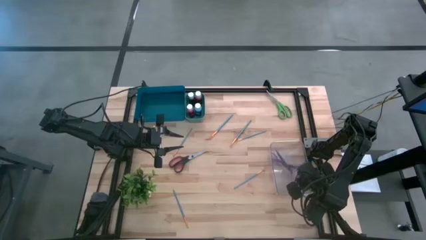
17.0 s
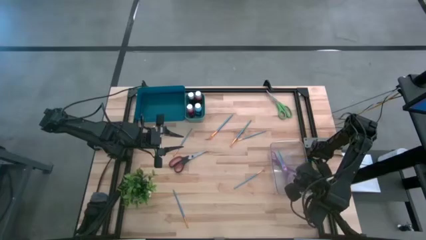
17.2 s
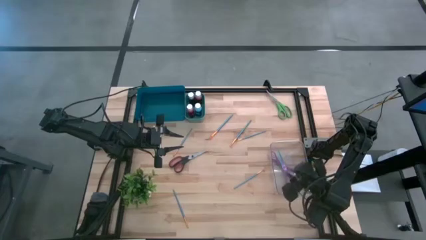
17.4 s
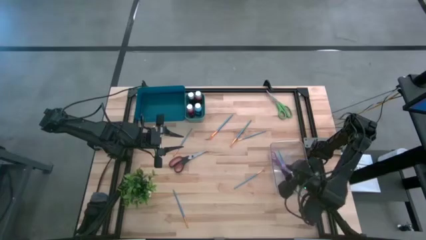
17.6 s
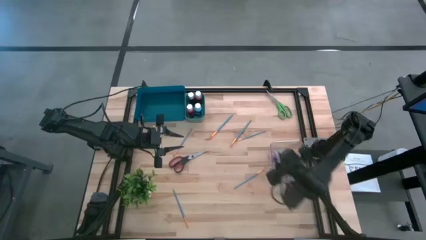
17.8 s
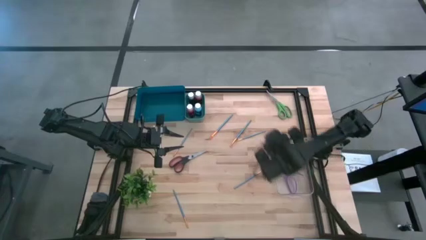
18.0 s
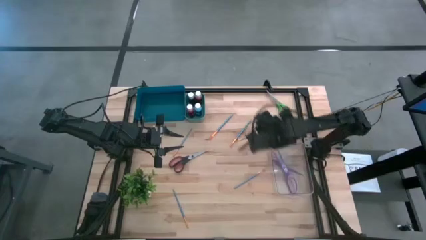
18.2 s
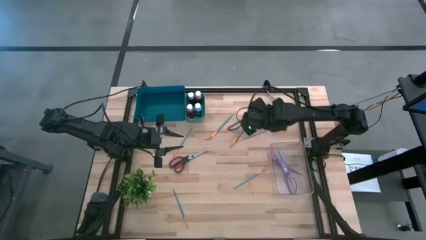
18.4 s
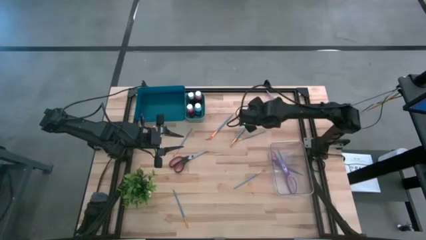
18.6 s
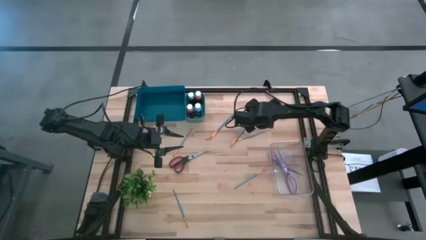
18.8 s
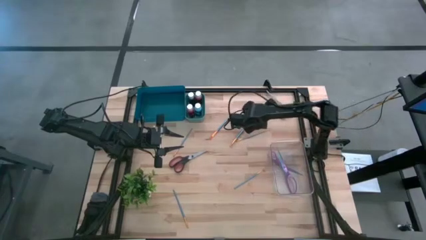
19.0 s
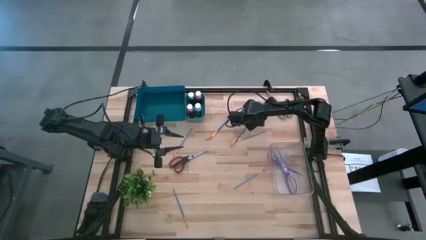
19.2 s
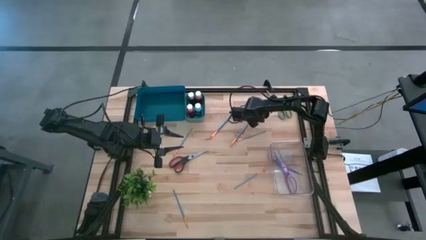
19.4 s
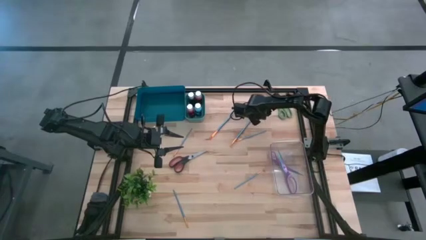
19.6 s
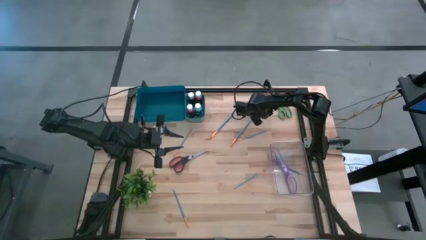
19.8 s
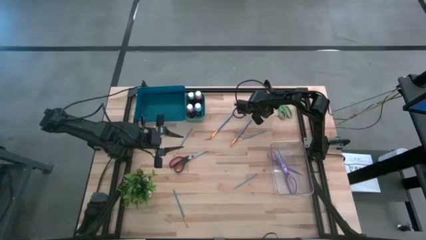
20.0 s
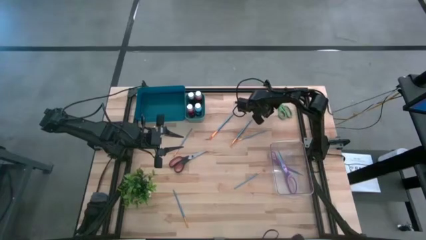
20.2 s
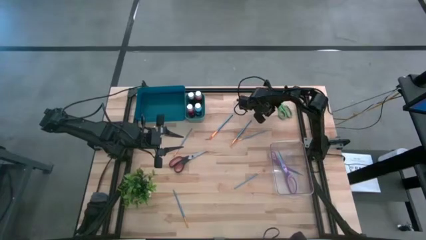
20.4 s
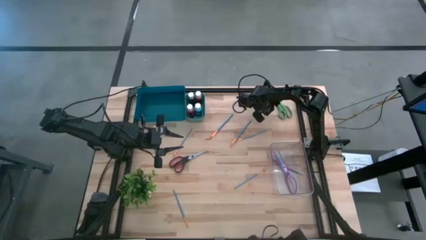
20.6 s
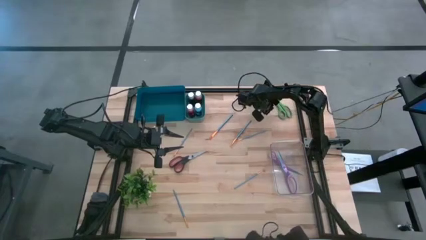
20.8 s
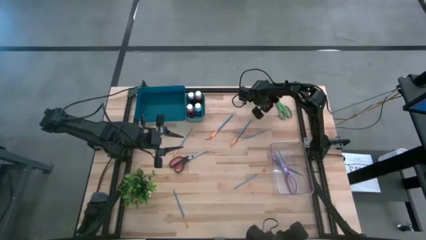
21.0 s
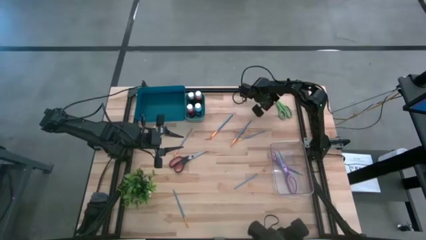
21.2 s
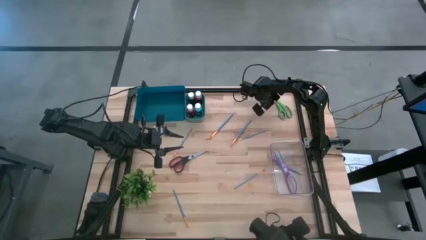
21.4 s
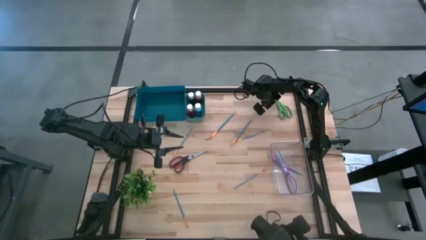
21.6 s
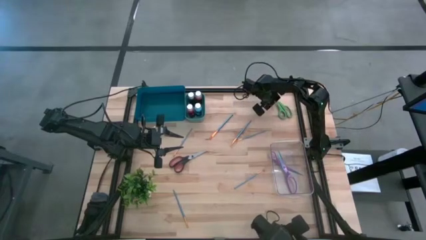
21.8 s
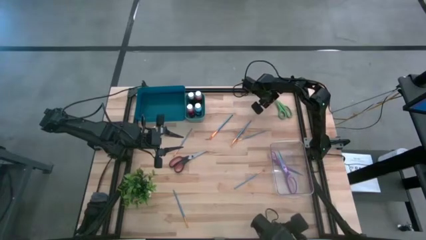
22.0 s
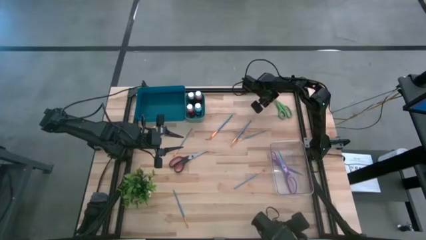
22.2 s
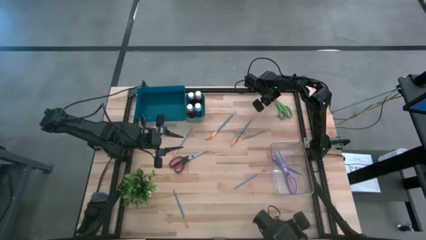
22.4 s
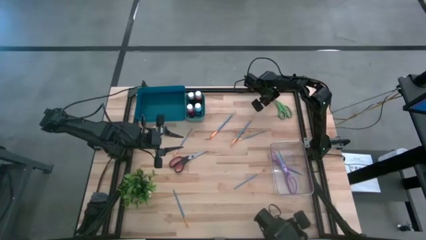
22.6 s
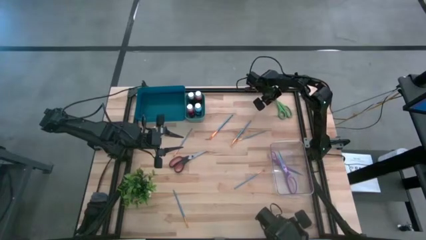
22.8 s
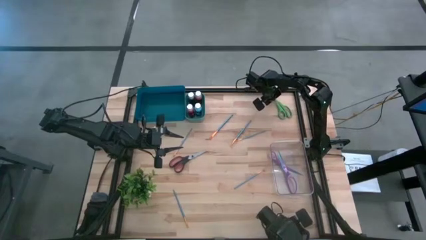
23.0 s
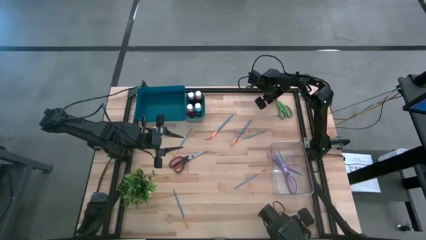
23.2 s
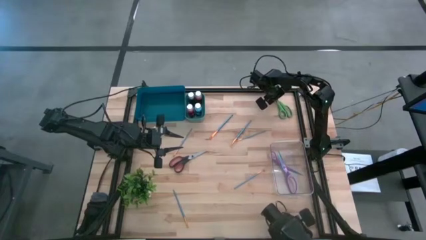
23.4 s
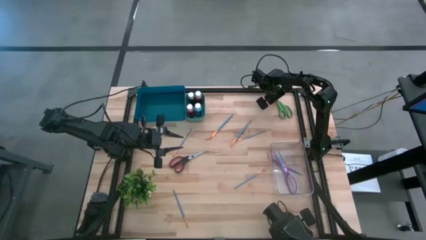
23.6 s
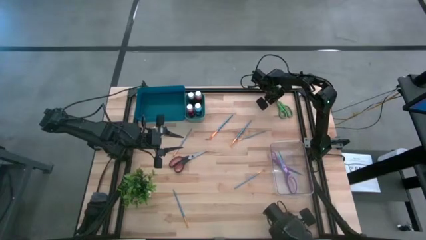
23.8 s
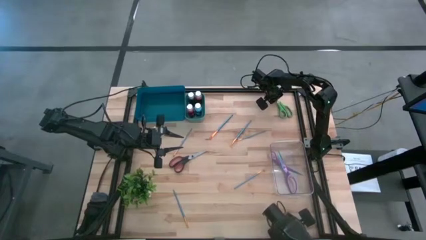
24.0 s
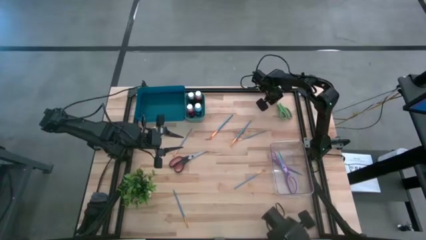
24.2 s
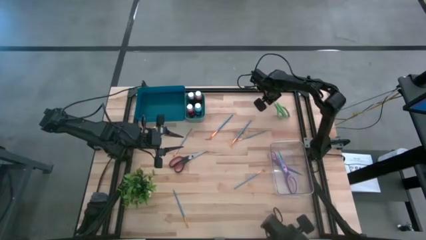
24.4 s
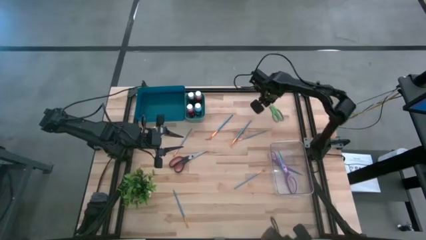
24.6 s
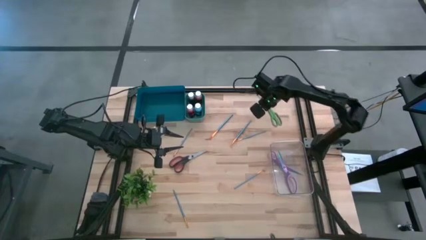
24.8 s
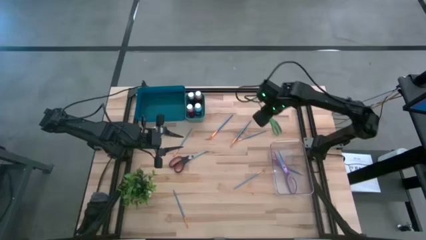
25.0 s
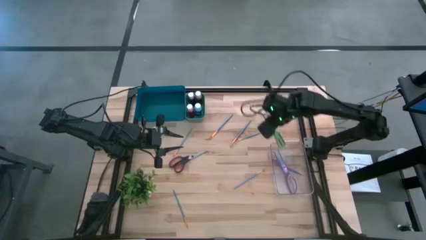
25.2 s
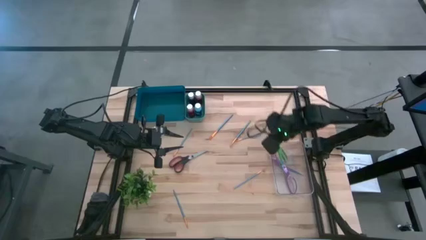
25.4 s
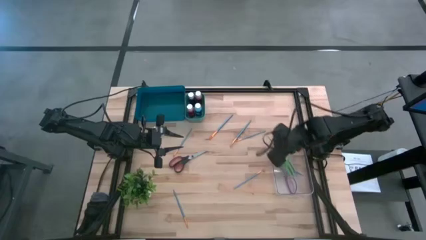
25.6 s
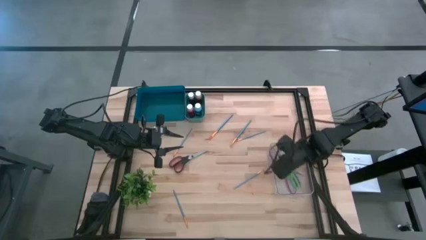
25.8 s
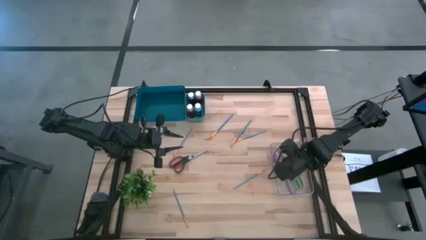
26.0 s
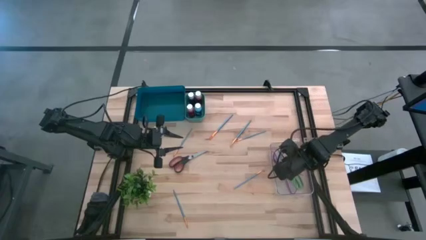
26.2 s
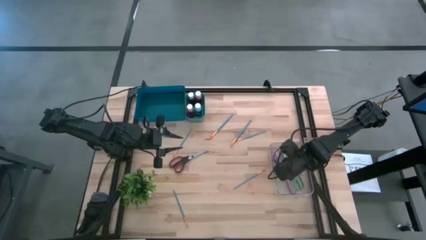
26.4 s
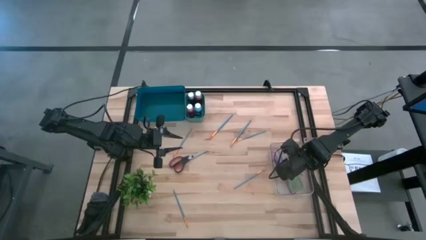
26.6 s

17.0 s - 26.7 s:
Task: Pick & Place Paint Supplies
Put the green scissors into the transparent bin

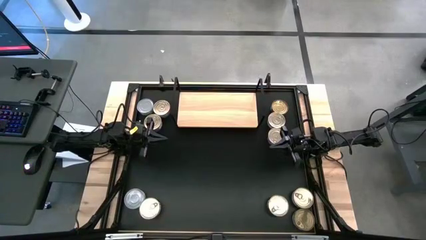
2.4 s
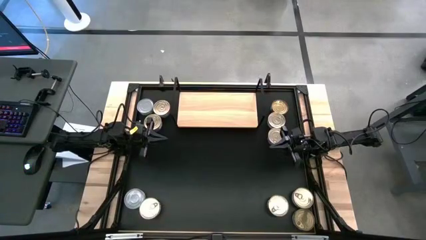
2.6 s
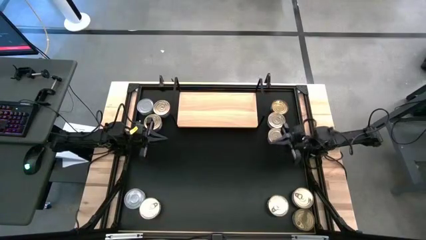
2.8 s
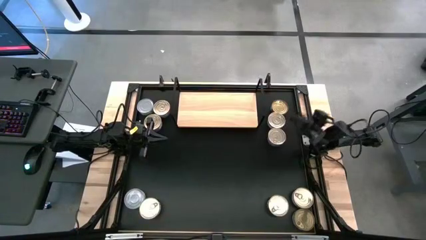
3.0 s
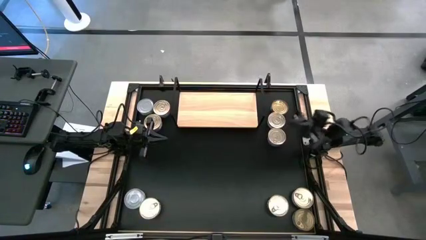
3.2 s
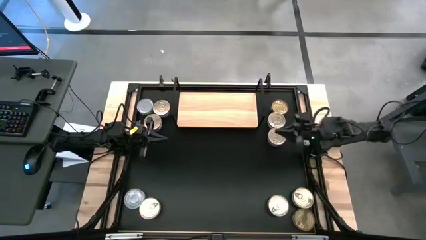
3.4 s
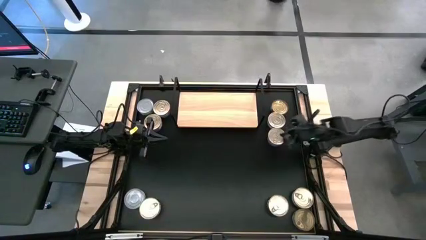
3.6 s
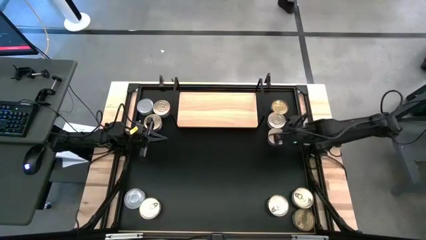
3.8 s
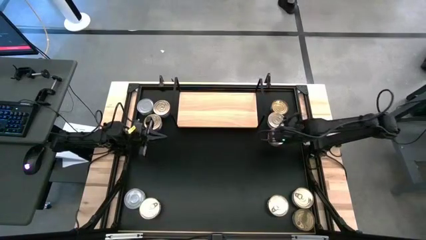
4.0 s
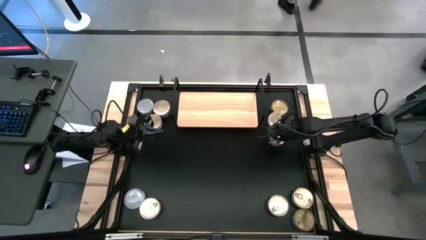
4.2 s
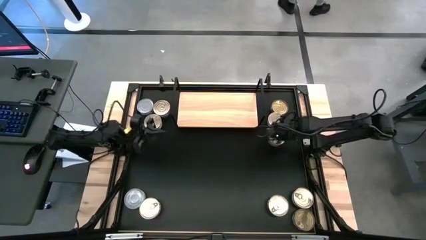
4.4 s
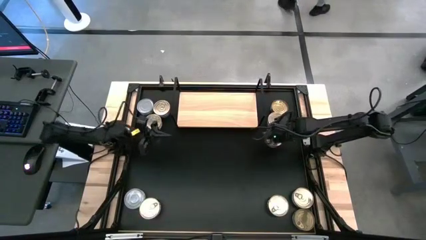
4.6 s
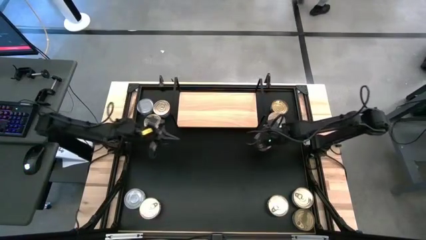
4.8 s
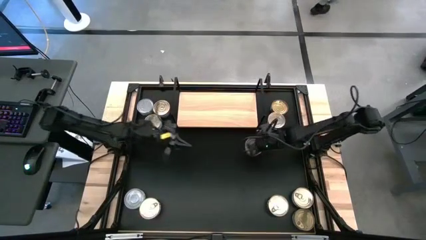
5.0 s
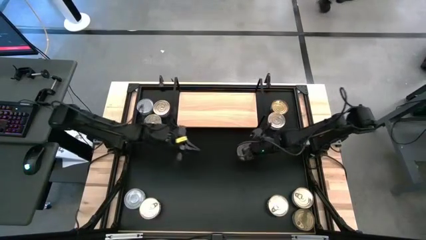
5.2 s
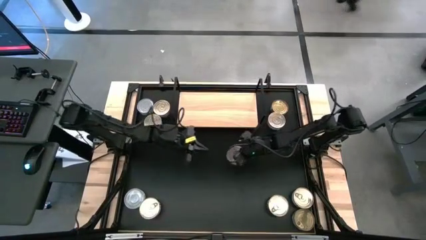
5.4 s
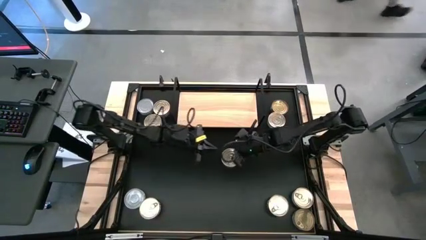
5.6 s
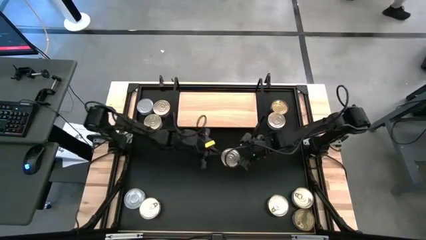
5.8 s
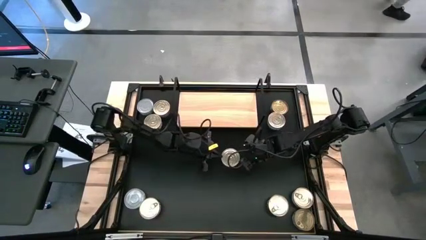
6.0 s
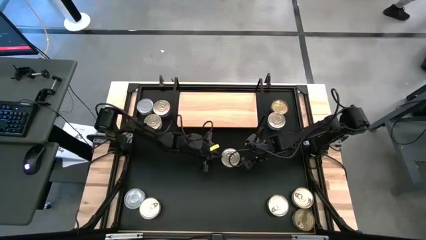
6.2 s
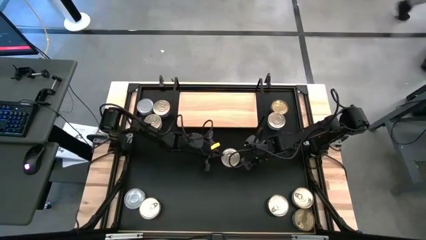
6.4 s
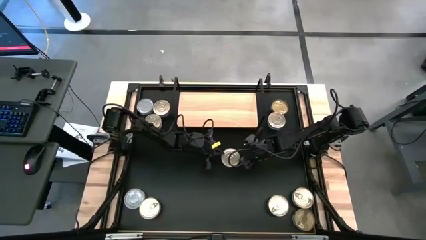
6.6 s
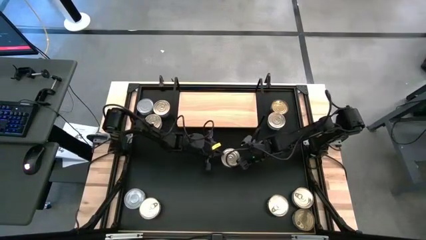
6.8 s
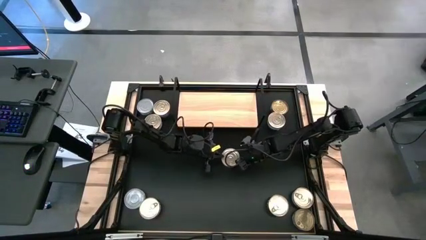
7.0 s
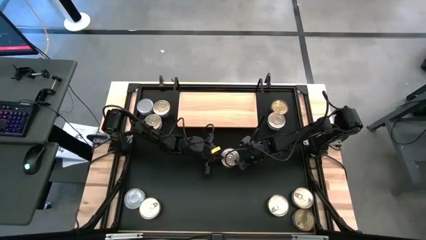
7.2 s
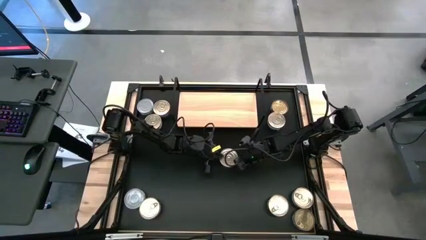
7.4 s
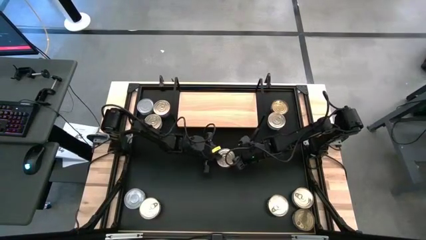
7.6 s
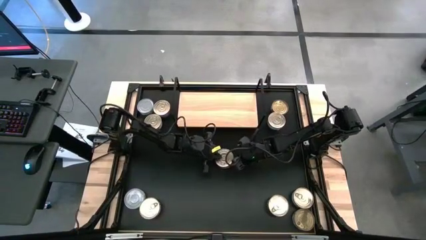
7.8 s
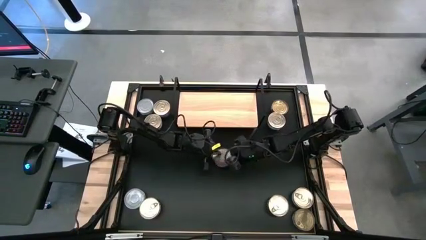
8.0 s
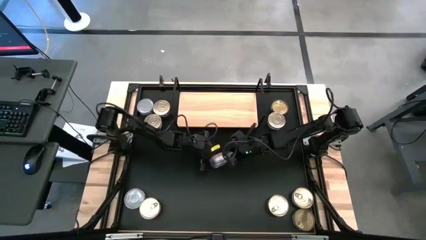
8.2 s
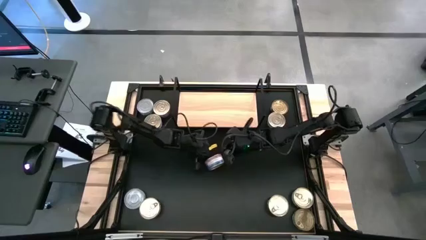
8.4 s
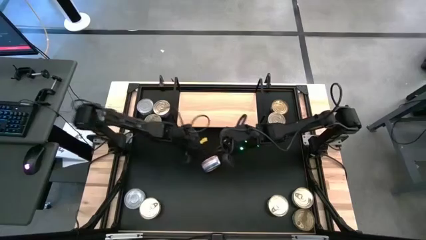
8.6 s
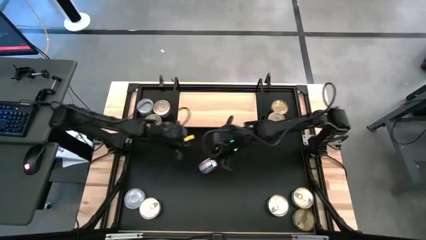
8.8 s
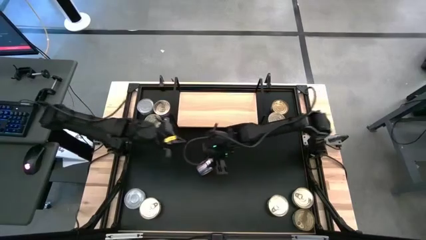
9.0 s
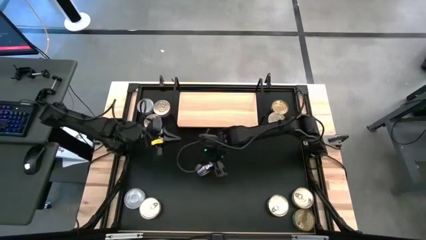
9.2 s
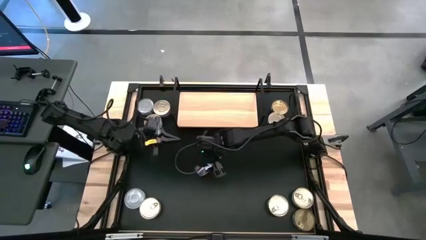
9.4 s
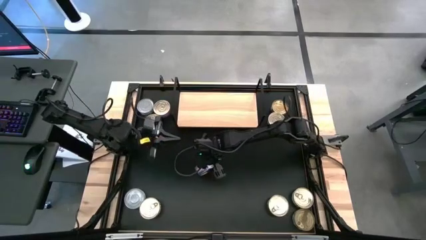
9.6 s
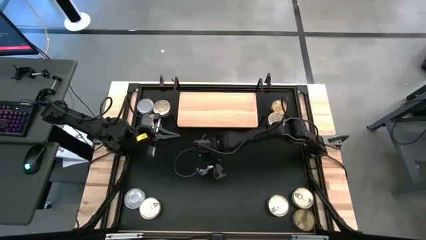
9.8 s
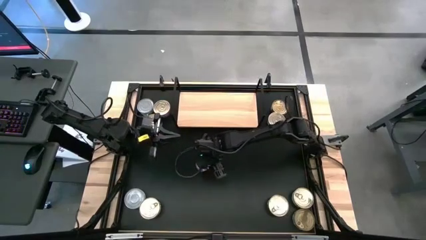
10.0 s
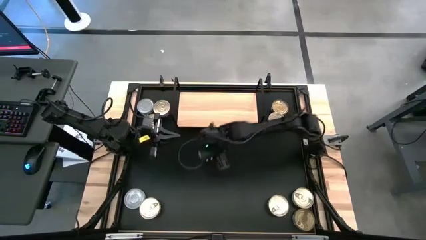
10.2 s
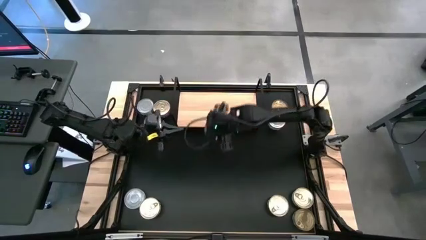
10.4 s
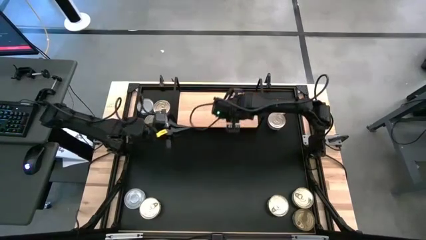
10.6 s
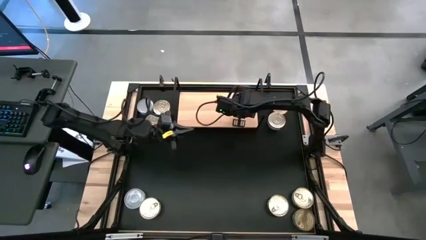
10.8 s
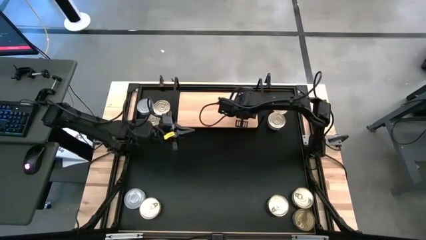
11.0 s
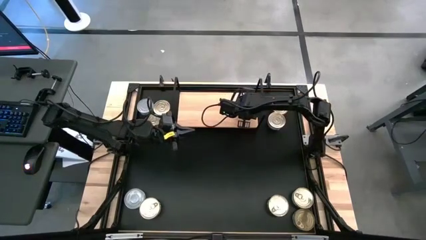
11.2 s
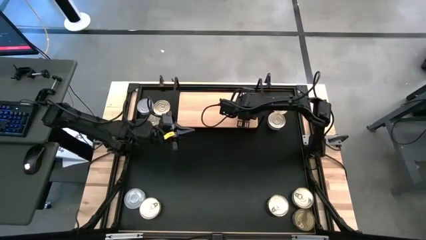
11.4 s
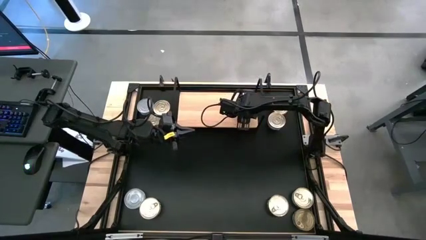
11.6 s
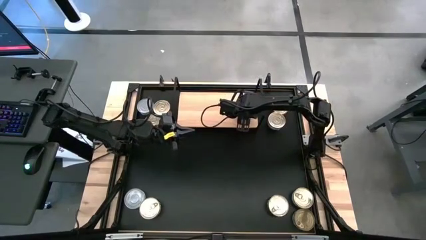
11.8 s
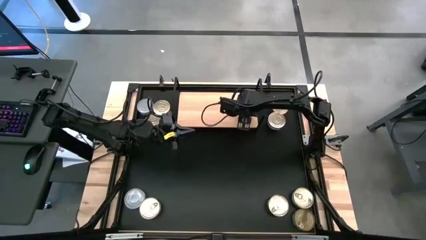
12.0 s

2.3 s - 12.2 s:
Task: Stack canned seafood by type on shelf
Put the blue-pink tuna can on the shelf
